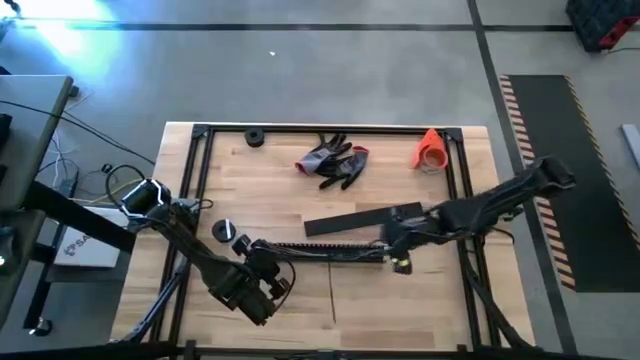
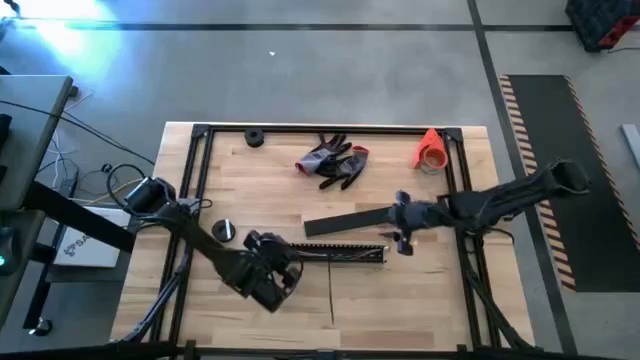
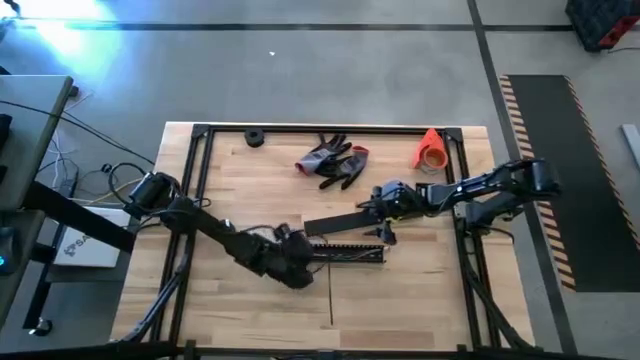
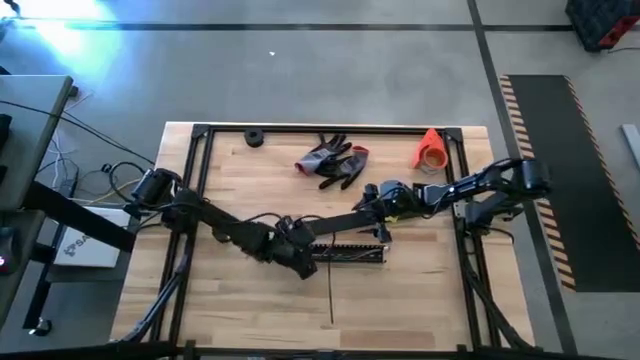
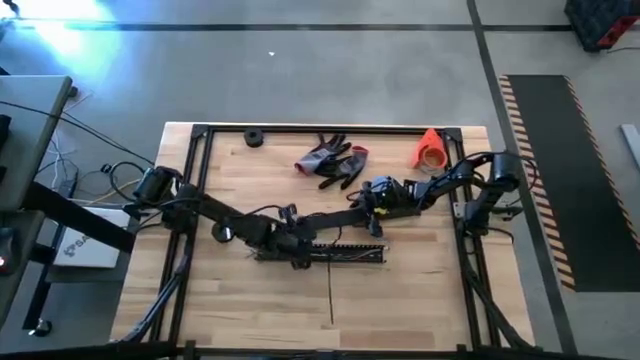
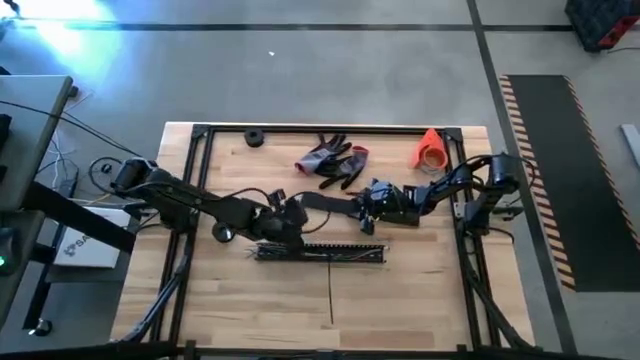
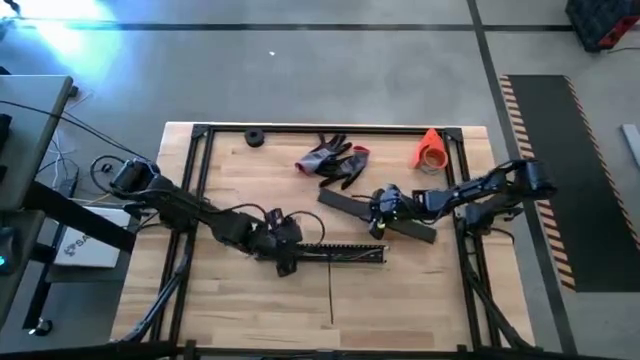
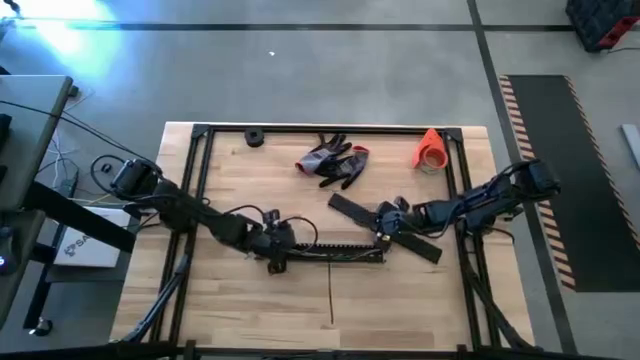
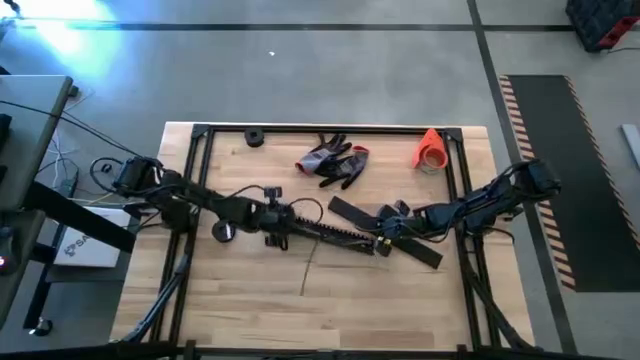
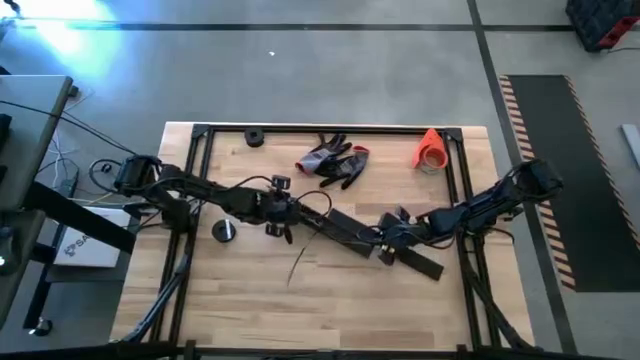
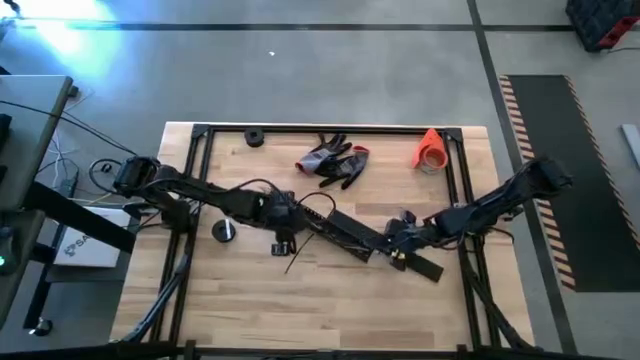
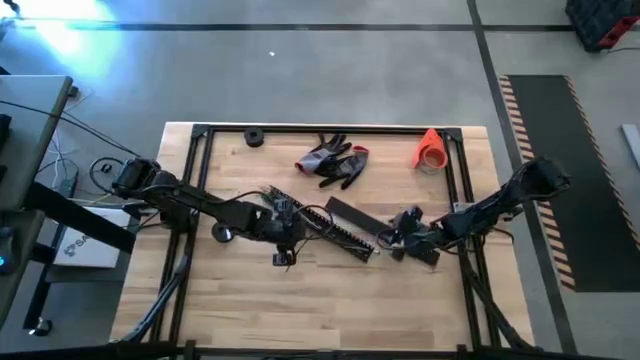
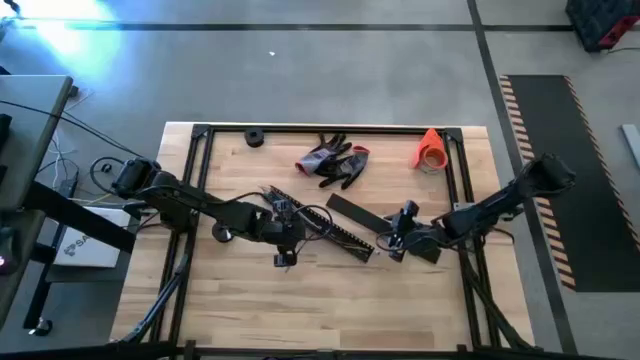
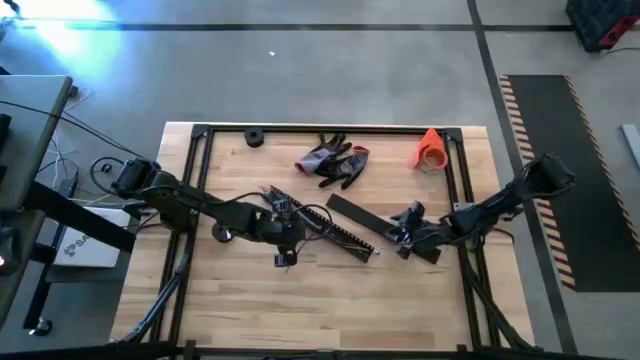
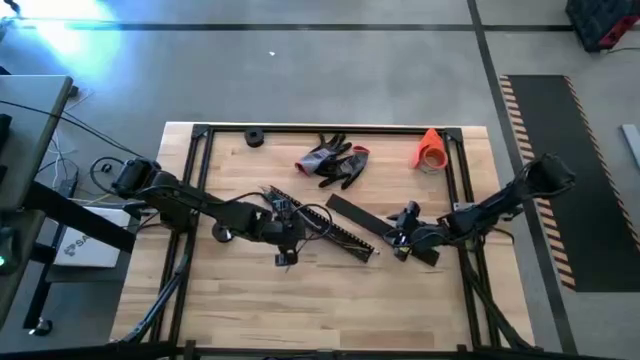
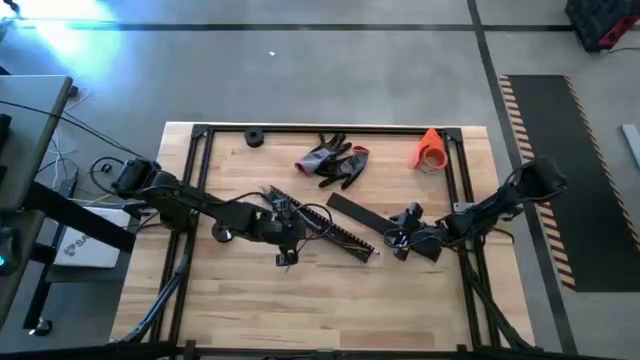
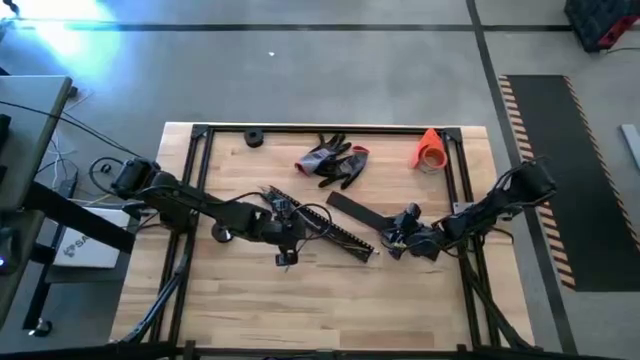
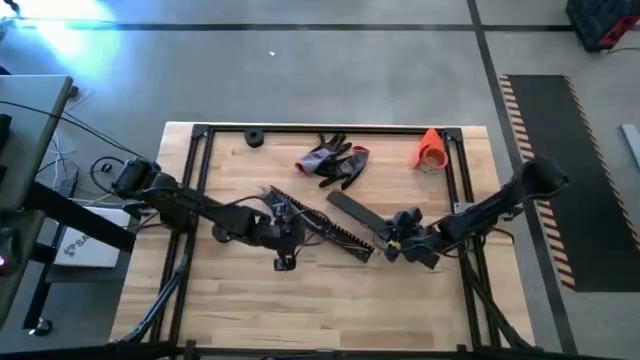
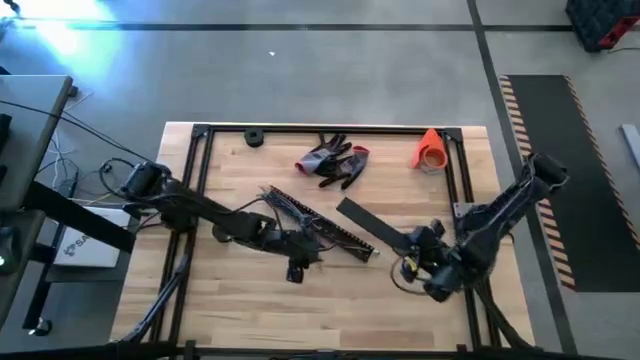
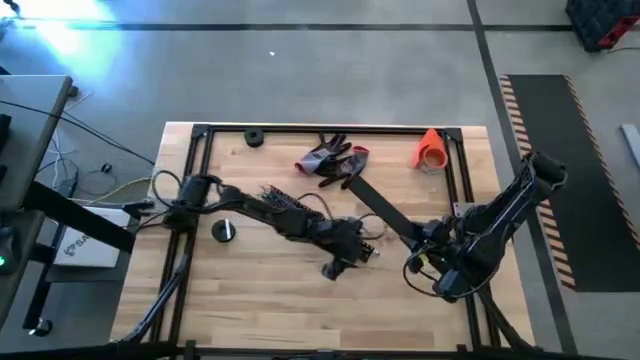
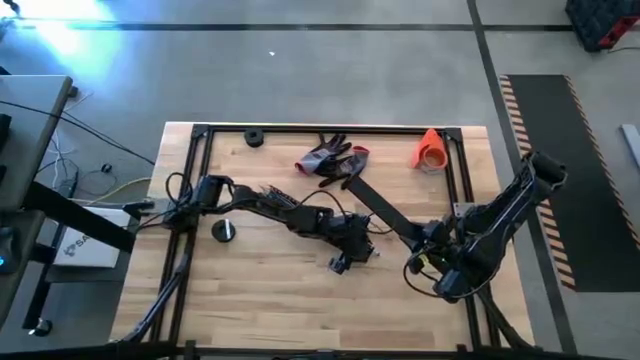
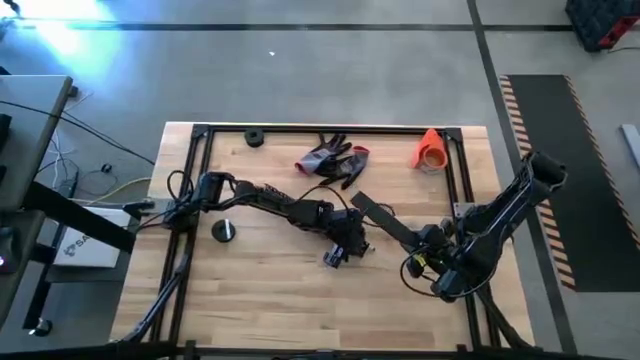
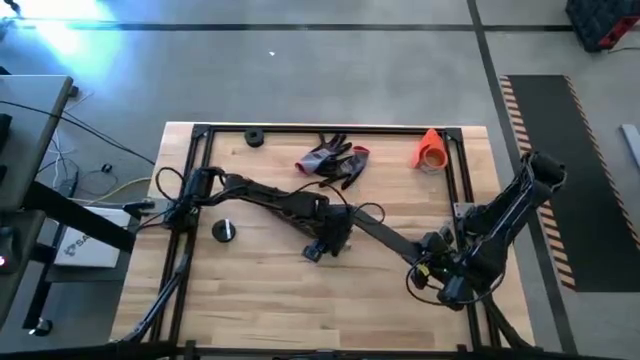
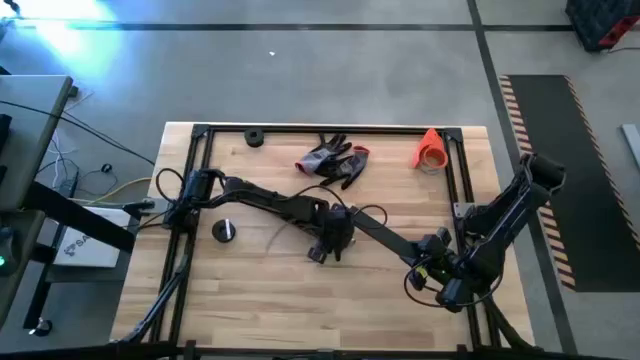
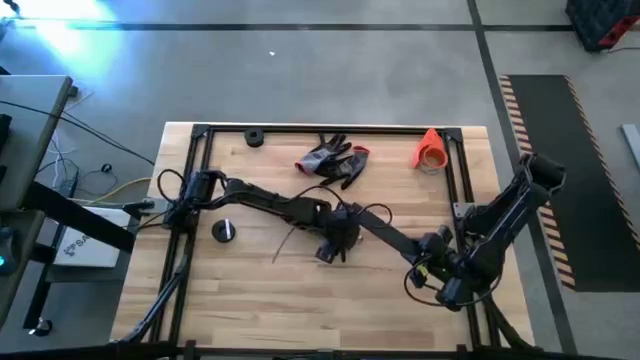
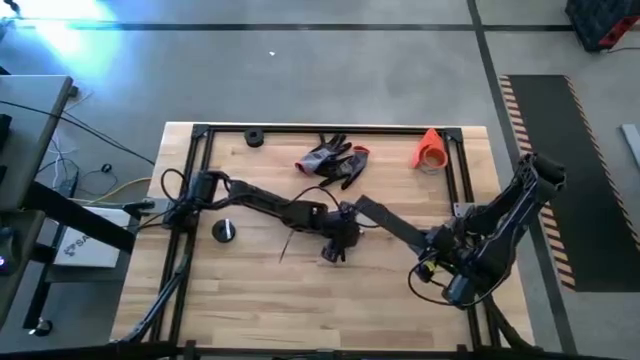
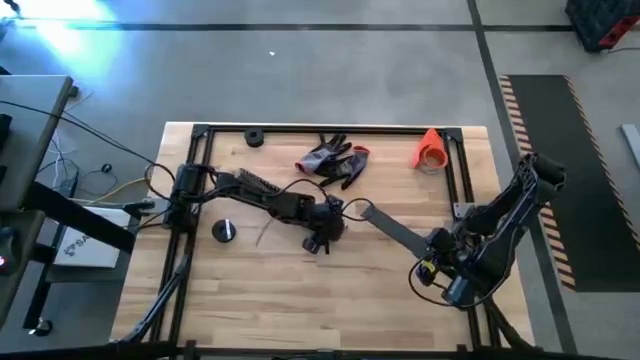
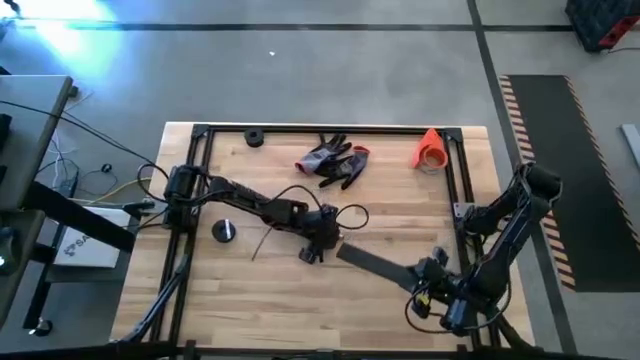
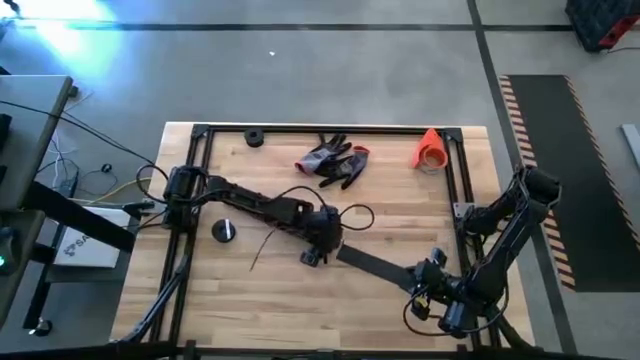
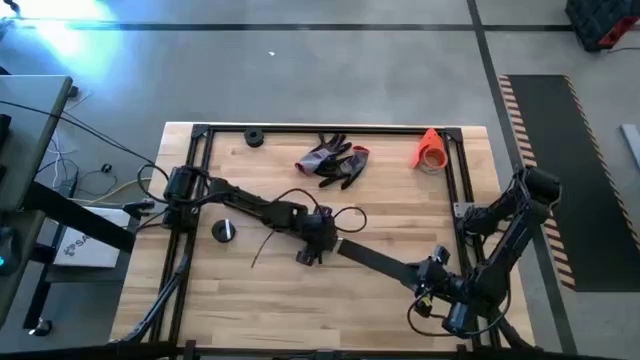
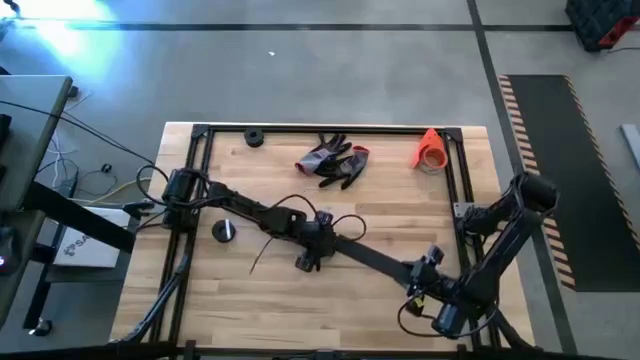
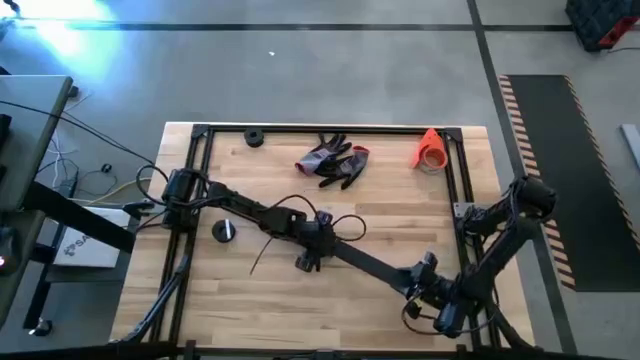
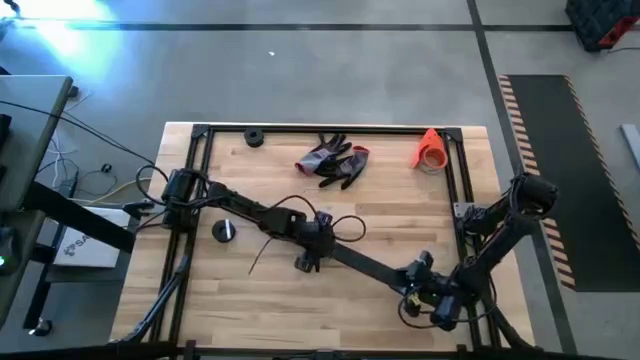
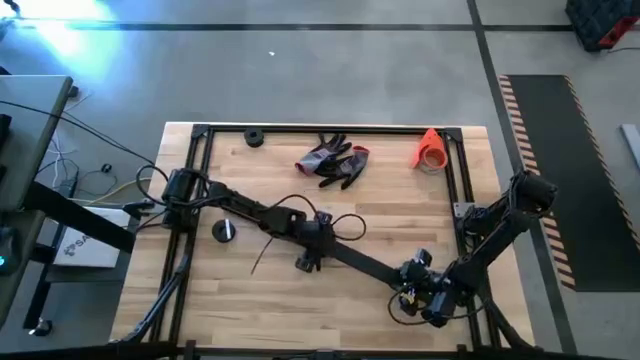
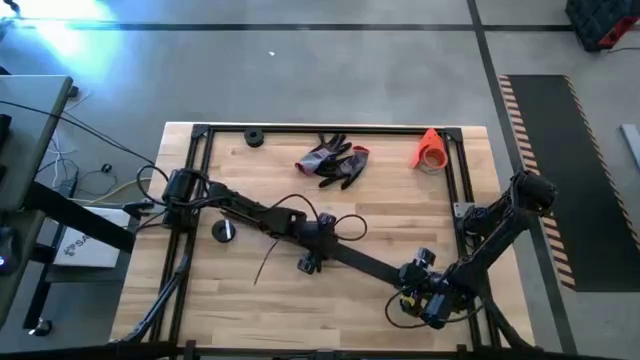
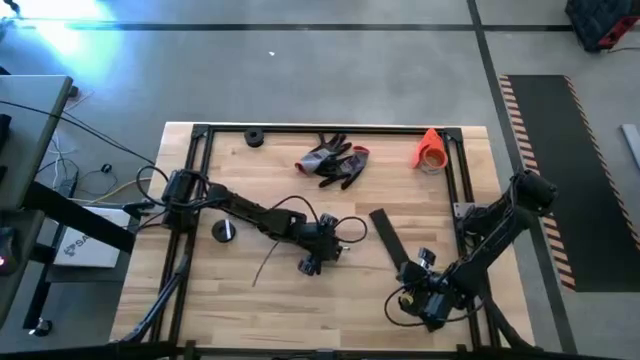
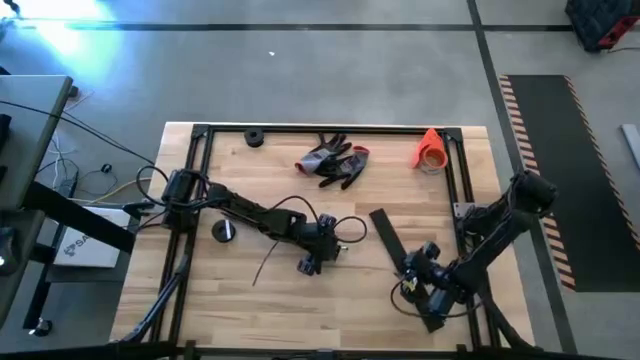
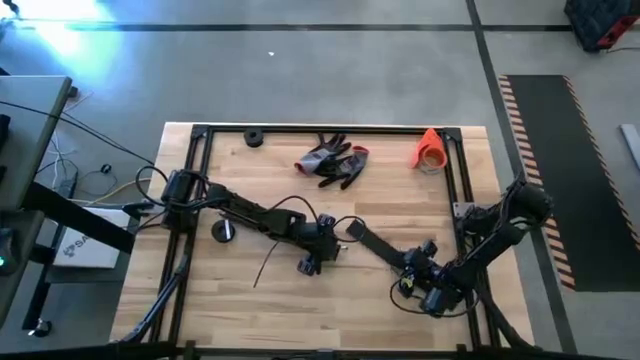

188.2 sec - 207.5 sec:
Task: Ziptie cables
Close the black cable duct

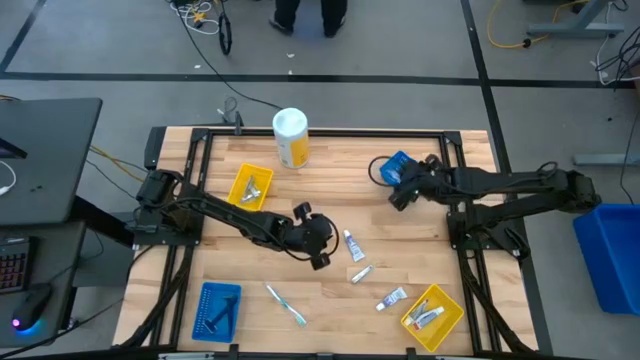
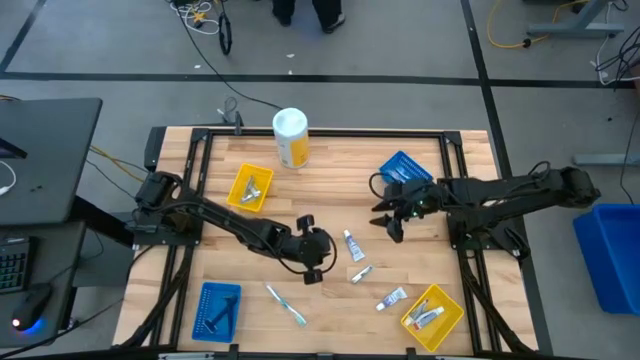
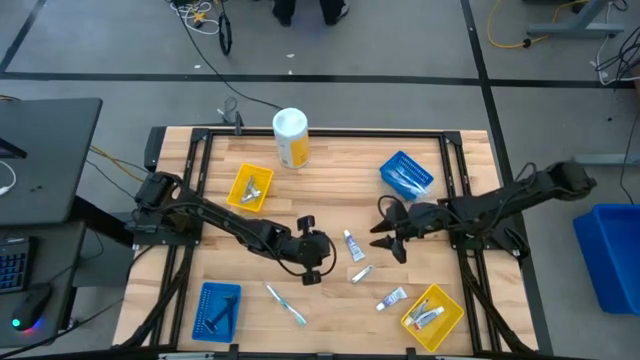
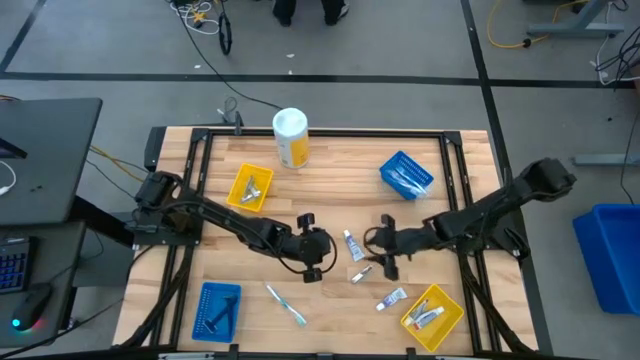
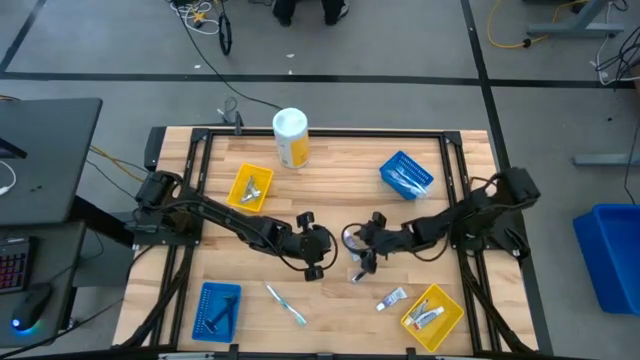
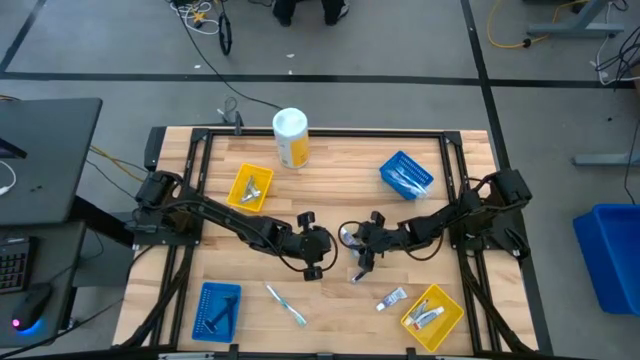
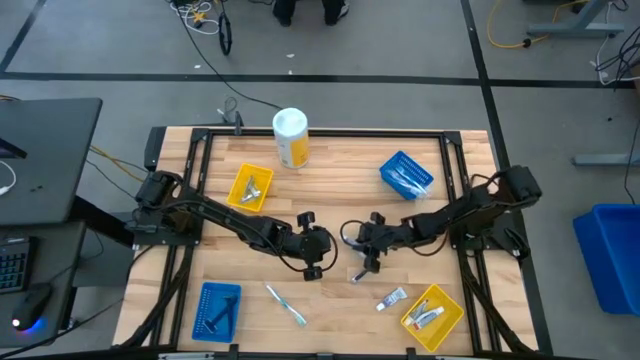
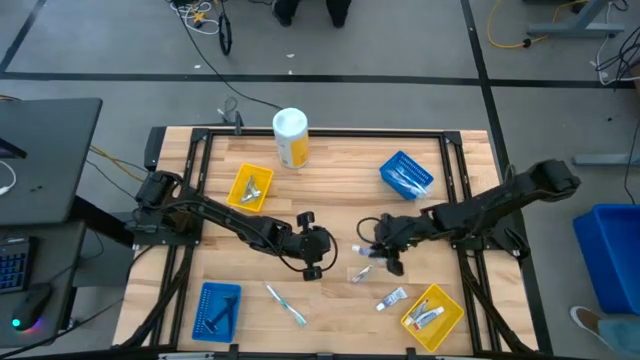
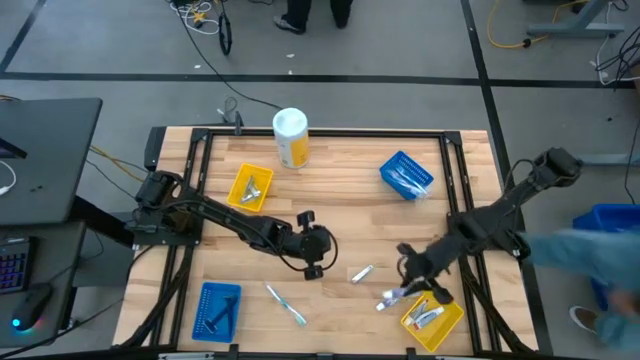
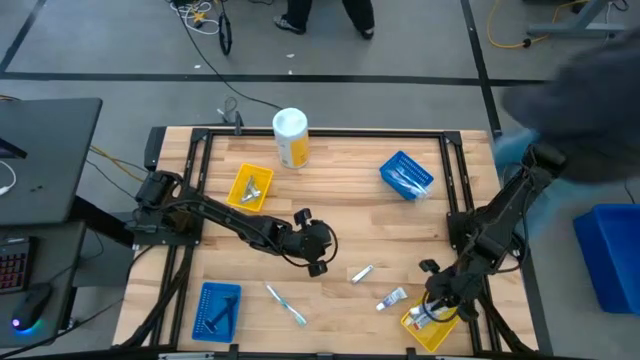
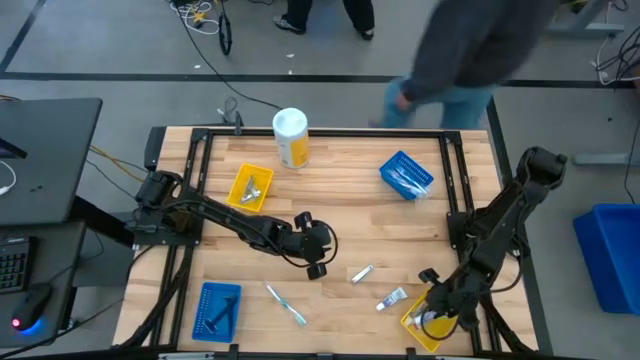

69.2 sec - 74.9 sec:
Task: Pick & Place Travel size toiletries
Put the white toothpaste into the bottom yellow bin
